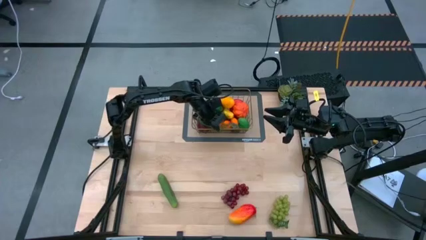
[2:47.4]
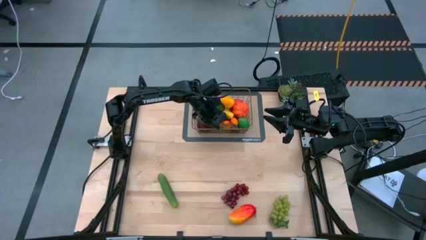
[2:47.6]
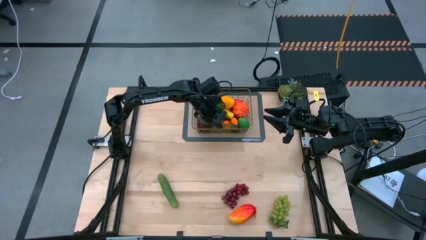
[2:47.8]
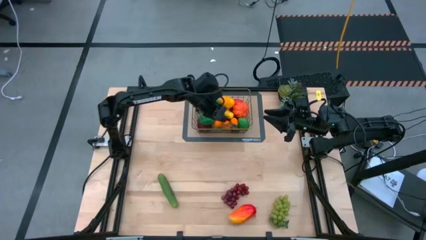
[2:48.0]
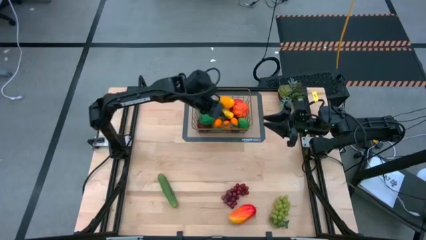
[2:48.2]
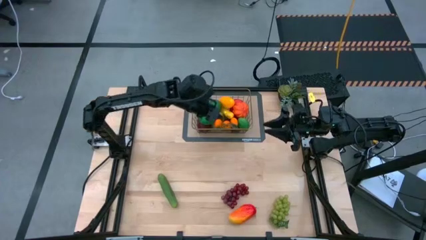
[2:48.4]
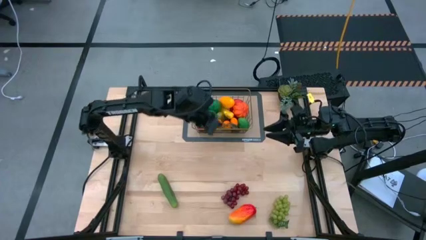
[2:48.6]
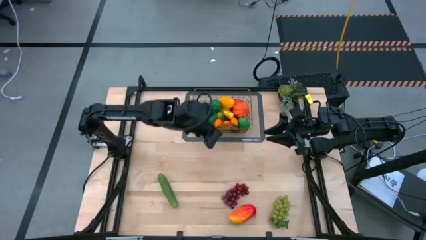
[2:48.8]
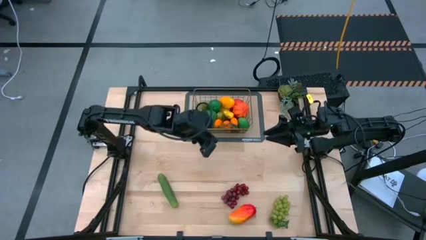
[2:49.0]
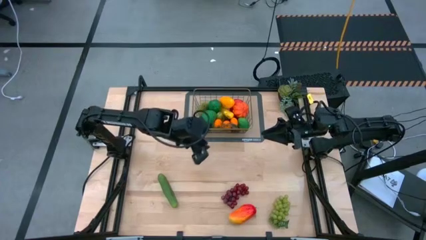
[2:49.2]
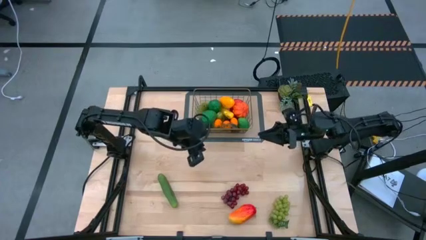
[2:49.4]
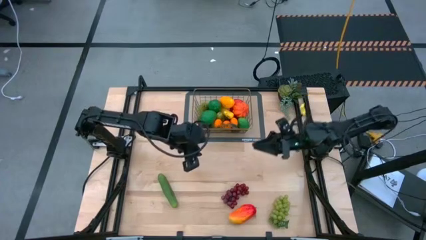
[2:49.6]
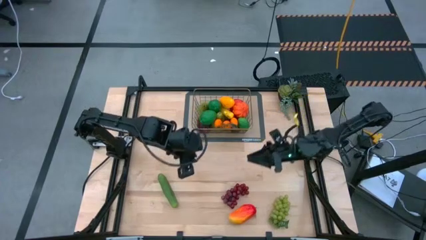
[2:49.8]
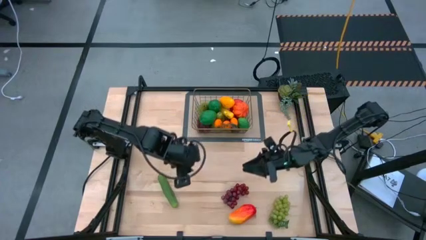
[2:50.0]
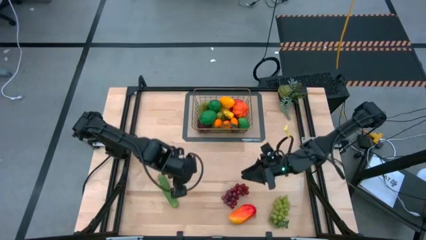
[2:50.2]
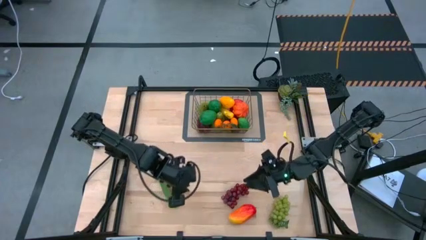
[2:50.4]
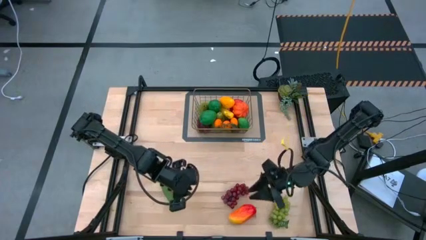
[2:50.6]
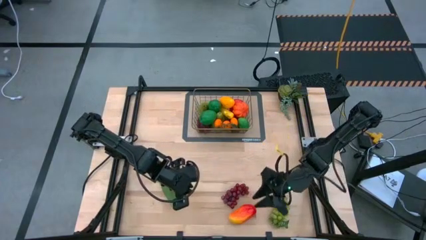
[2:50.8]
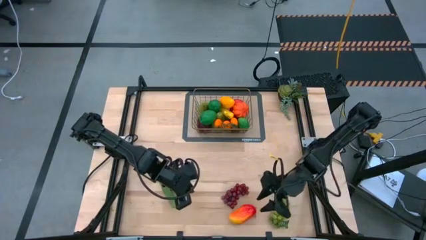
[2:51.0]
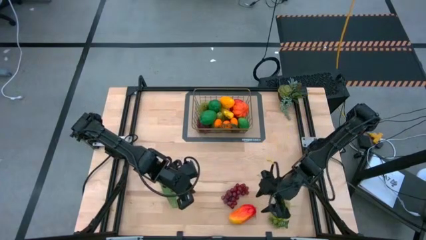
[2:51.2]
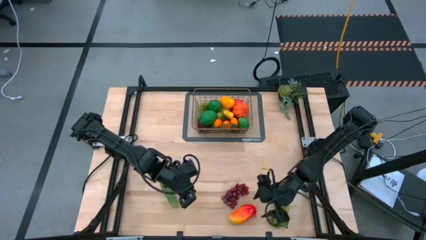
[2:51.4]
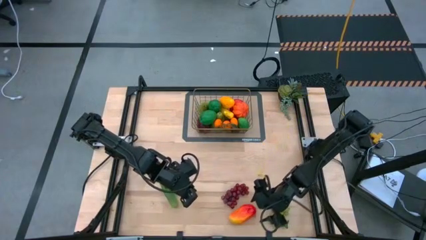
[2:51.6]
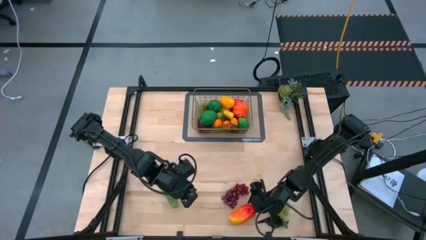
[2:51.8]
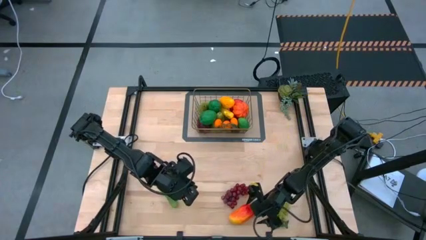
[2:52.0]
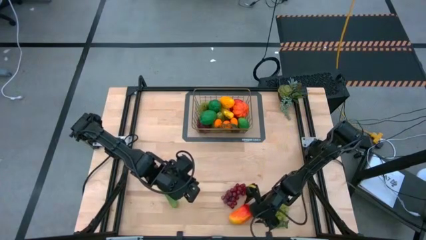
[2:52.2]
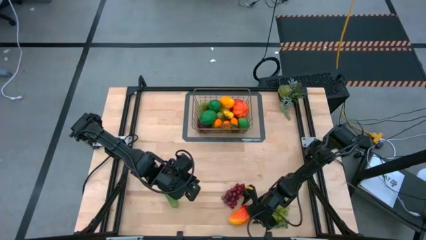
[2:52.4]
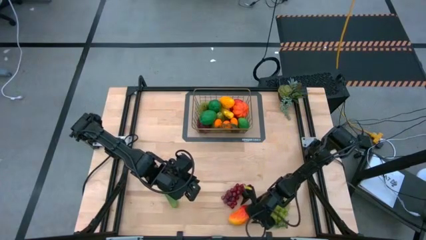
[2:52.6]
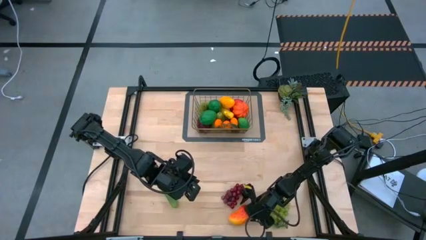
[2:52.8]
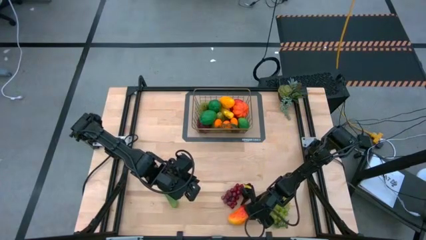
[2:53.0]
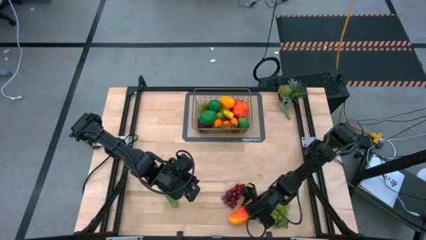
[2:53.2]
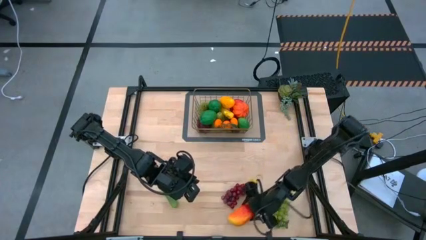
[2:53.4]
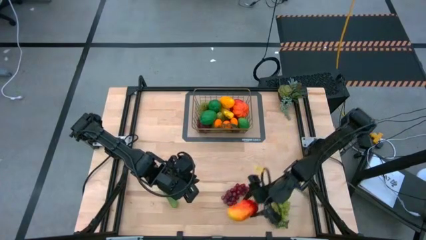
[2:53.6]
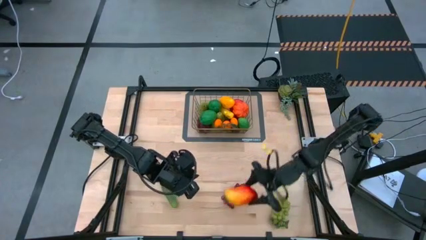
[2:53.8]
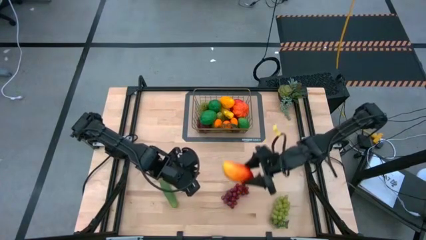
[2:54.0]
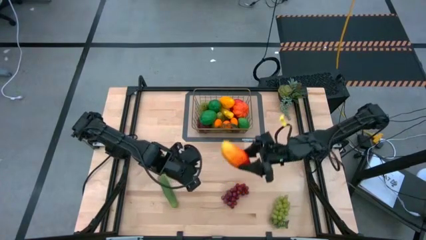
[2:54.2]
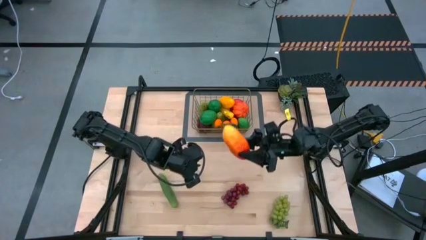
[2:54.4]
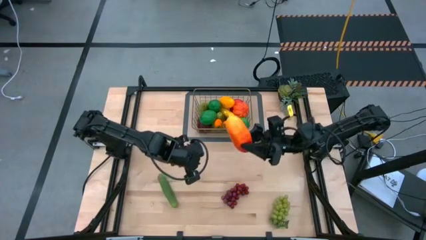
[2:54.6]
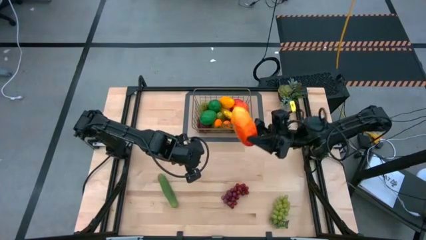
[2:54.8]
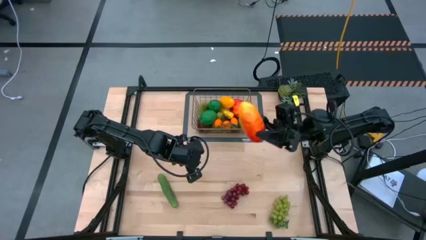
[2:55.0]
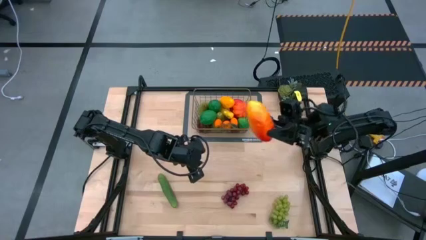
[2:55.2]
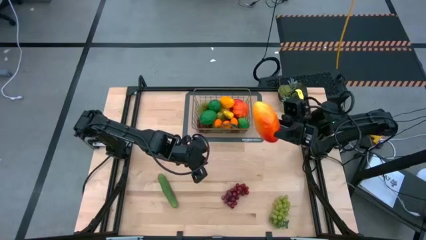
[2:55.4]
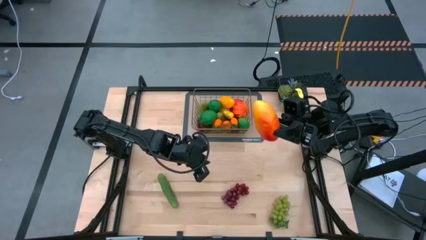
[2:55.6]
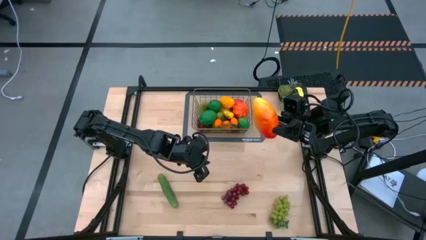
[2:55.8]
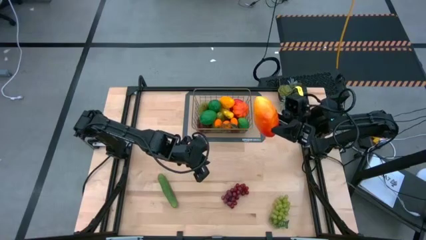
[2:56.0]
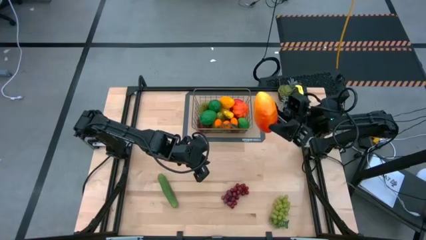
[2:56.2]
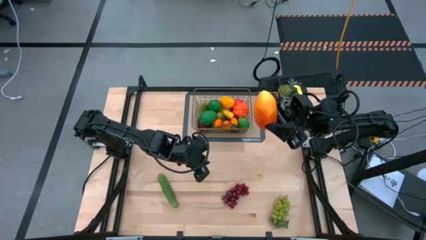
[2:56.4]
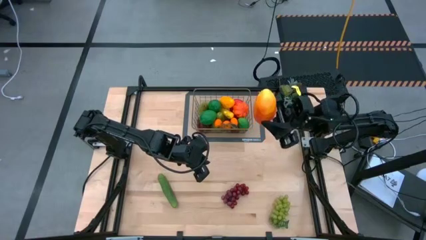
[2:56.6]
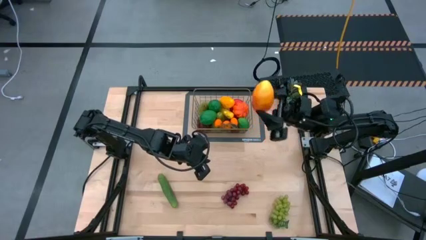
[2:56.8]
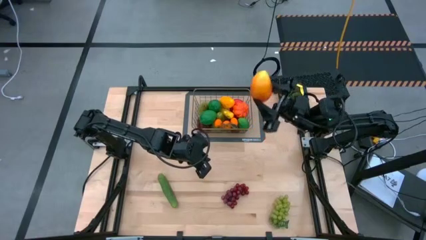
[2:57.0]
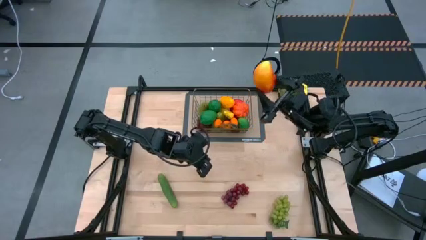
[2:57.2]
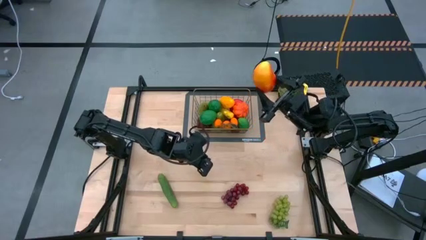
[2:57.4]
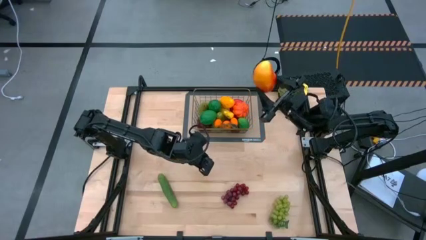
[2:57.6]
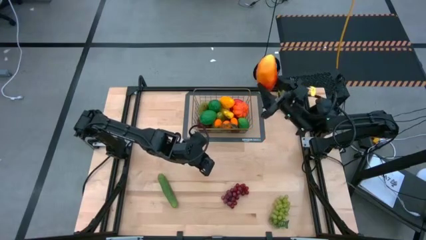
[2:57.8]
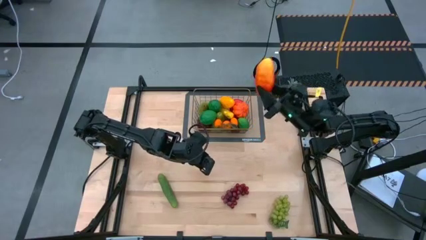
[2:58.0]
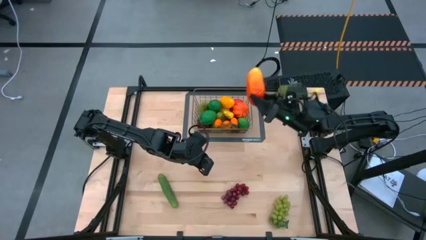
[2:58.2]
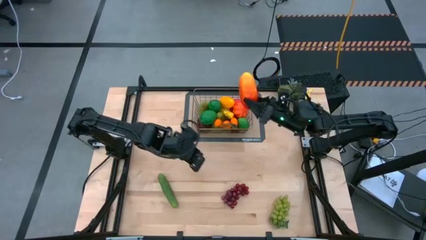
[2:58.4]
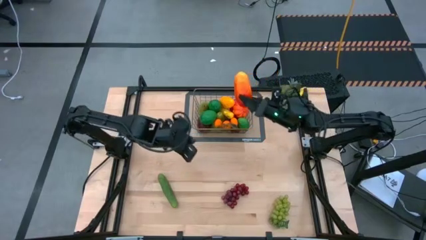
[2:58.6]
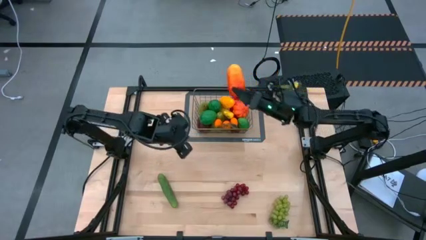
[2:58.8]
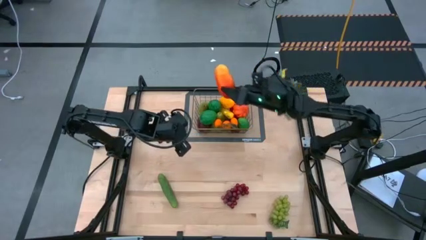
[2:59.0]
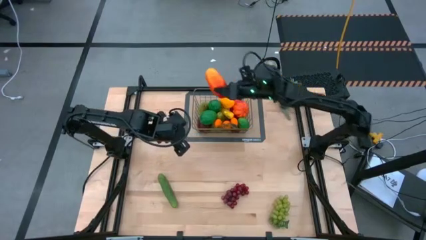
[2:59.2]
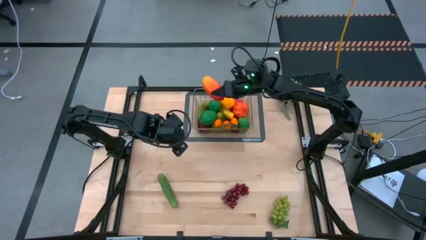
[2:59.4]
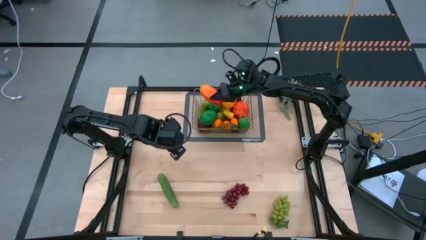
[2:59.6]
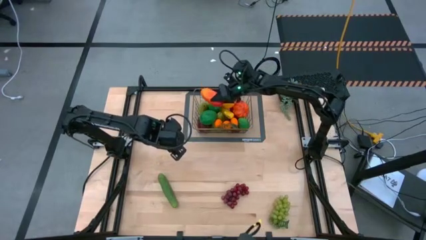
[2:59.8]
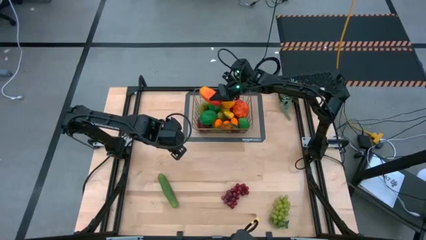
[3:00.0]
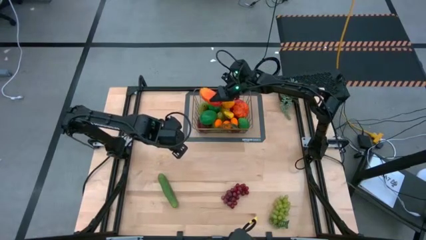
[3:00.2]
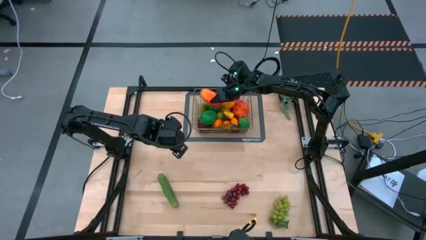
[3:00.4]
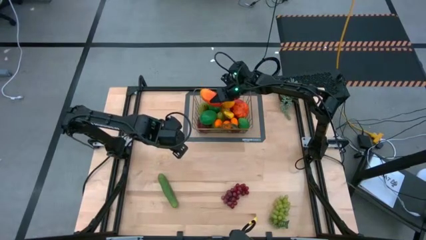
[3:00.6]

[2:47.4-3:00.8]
Task: Build produce basket
Put the red mango into the brown wire basket

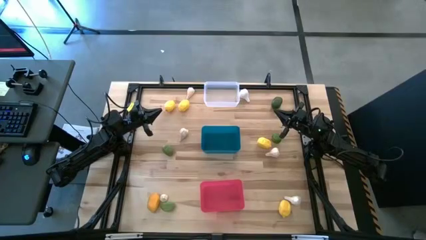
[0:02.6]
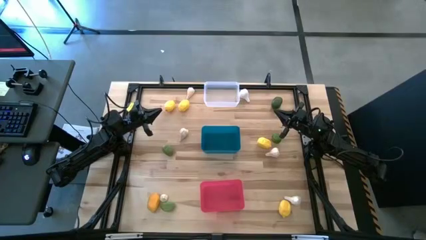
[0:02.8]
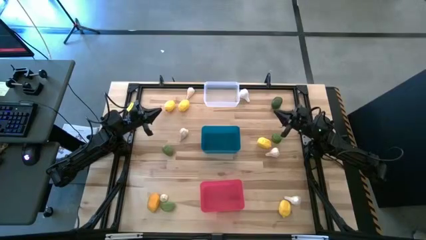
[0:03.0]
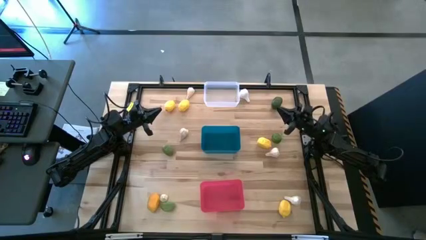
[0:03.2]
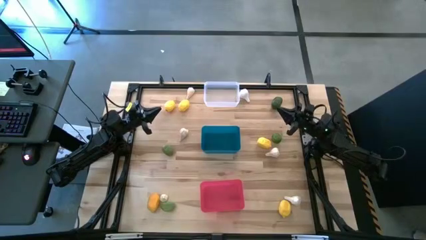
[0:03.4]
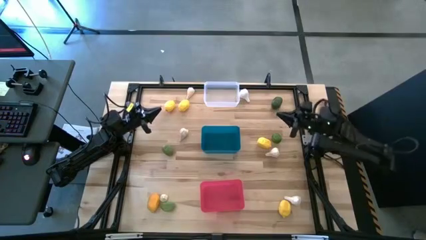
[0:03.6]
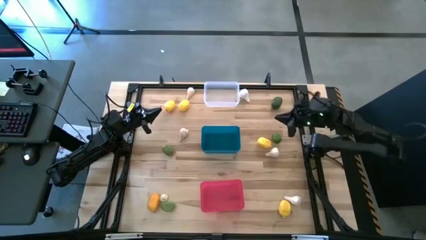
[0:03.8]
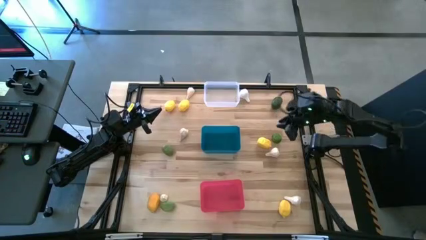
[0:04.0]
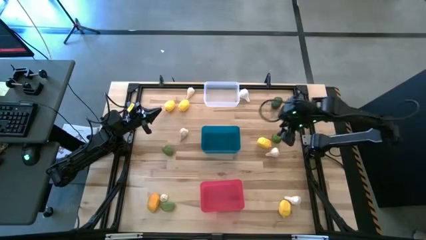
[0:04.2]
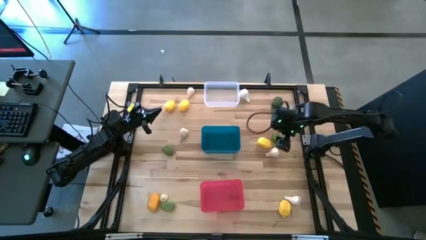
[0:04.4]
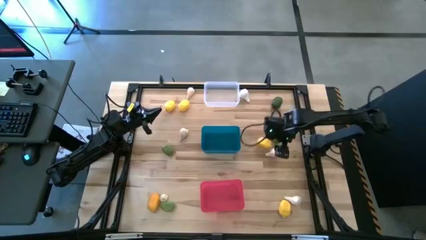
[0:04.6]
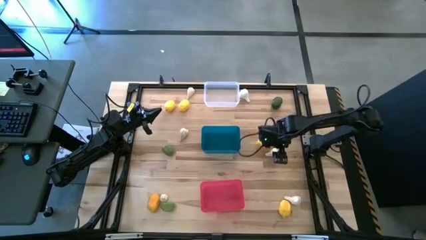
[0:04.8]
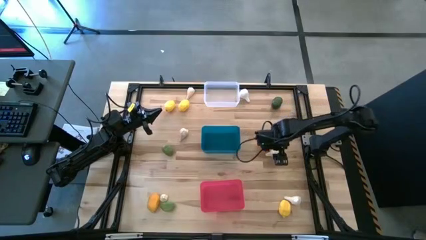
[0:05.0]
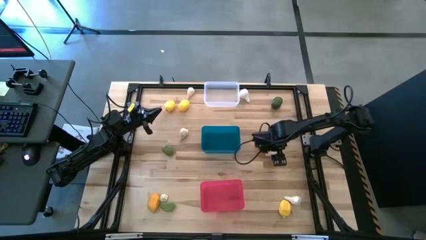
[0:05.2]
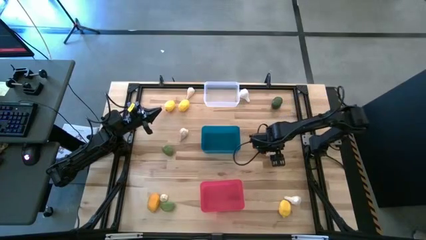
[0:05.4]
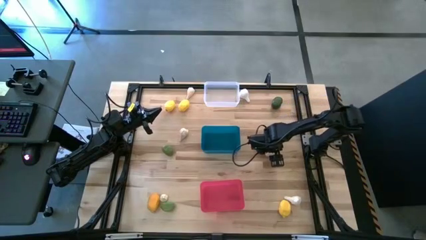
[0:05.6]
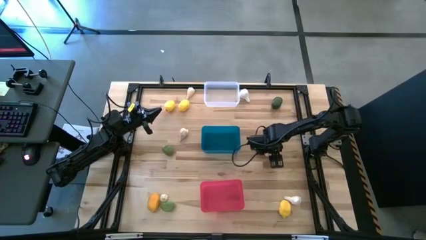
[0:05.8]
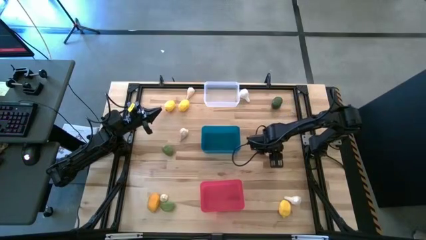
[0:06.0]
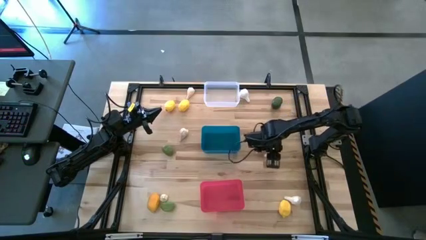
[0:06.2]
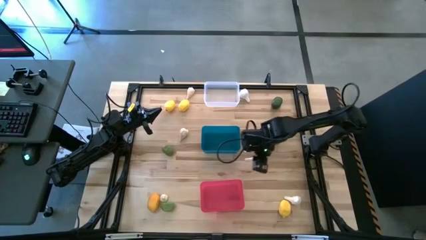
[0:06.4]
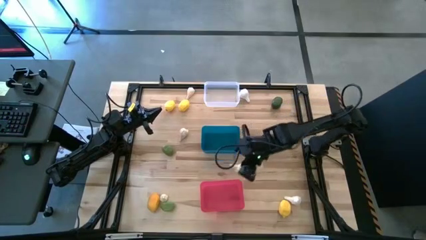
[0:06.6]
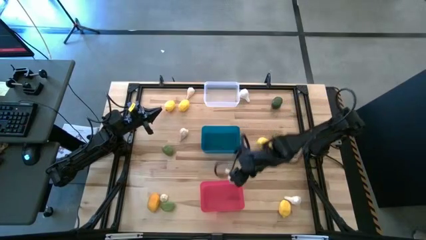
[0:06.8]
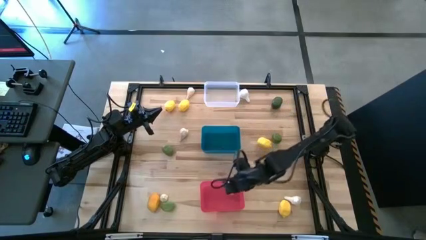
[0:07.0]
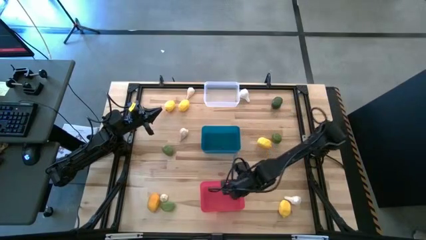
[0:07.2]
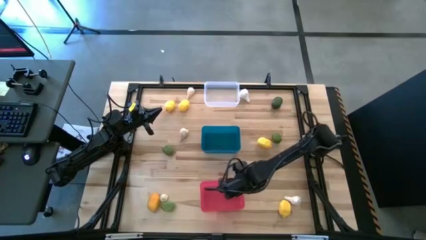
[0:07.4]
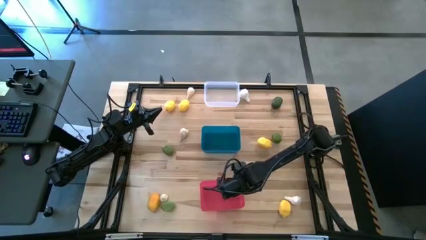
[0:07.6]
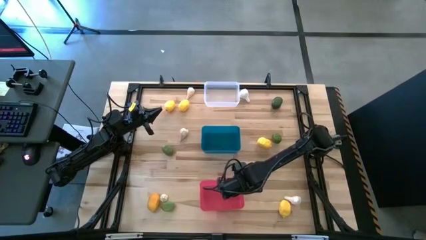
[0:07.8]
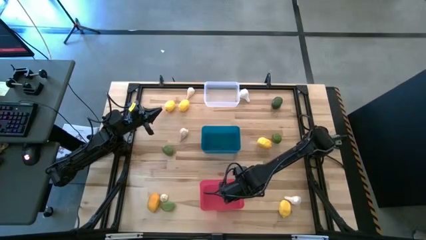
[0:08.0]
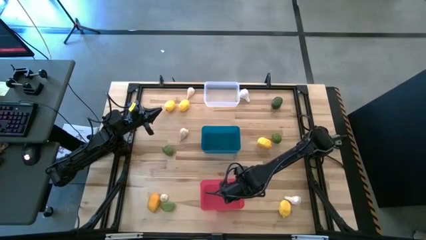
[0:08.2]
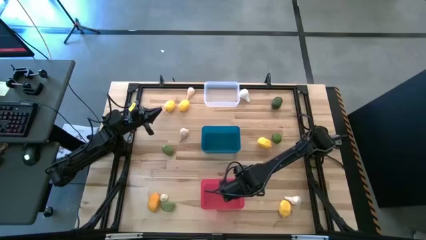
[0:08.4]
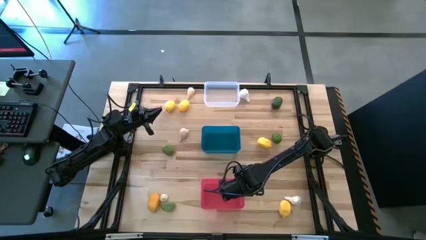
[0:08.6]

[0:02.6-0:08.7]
Task: Sort produce into baskets
Put the middle right white garlic into the pink bin
